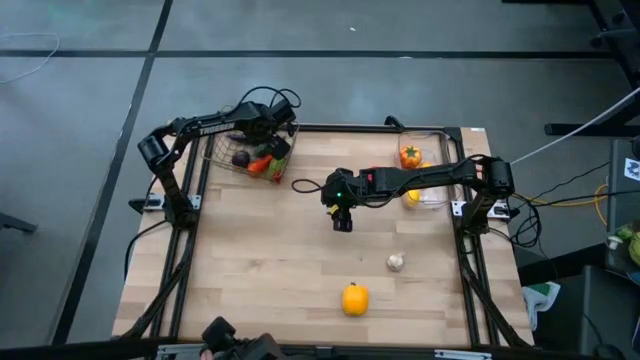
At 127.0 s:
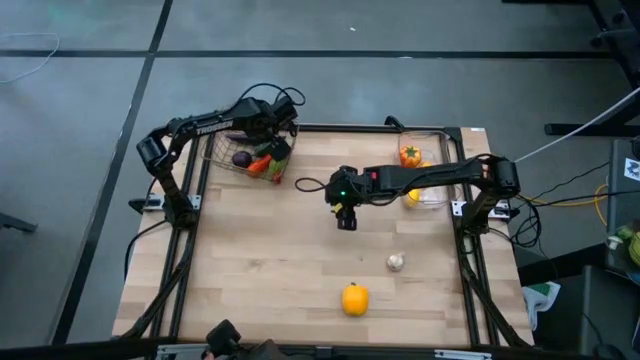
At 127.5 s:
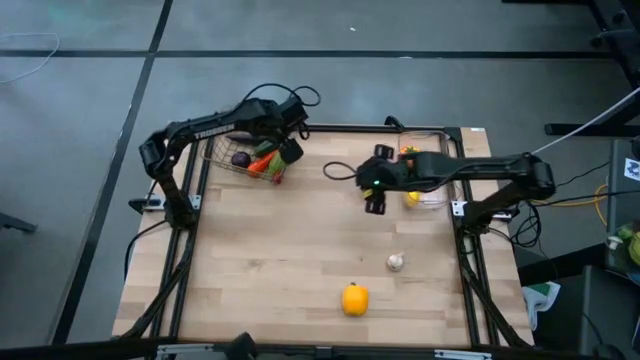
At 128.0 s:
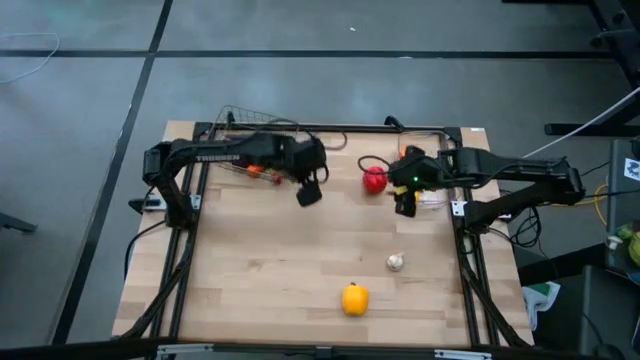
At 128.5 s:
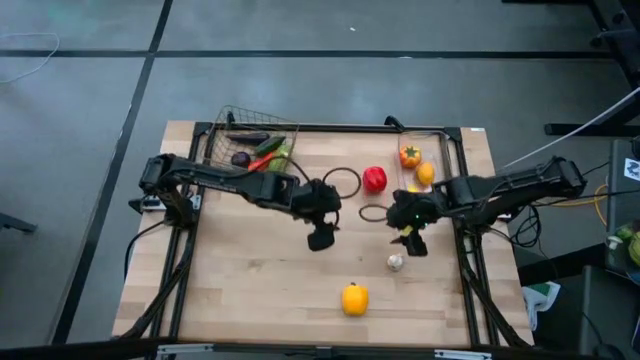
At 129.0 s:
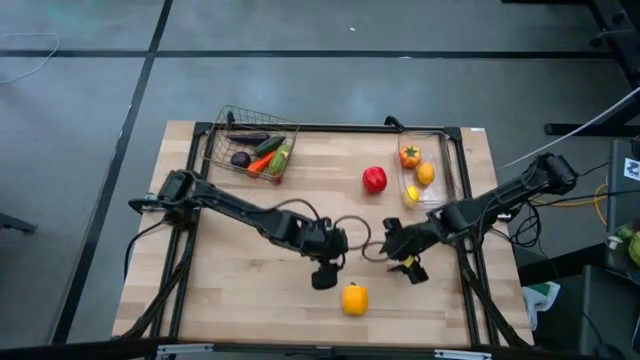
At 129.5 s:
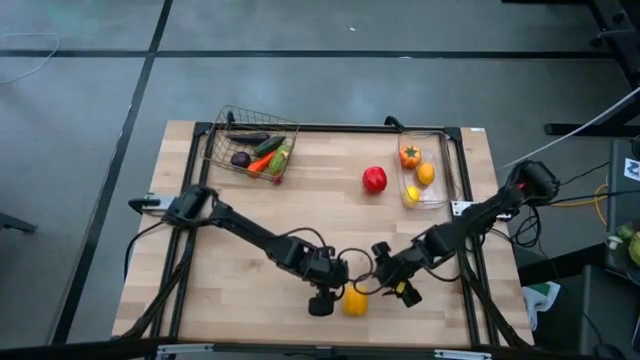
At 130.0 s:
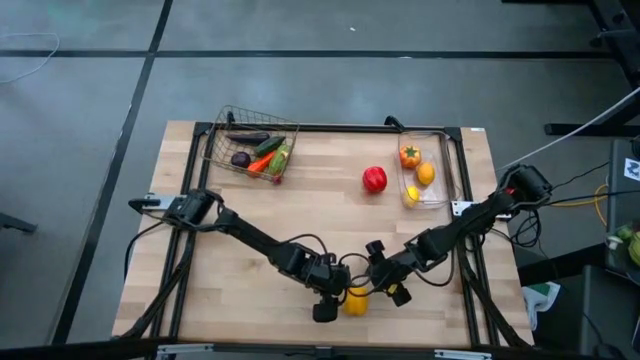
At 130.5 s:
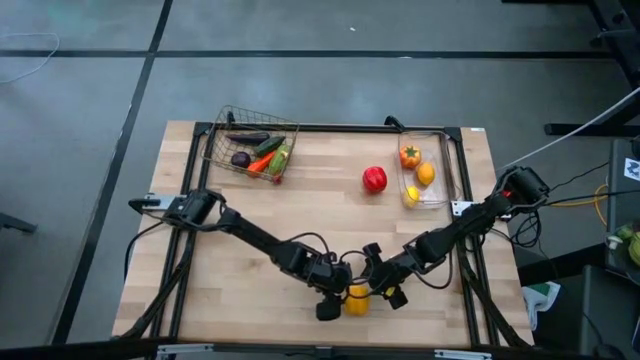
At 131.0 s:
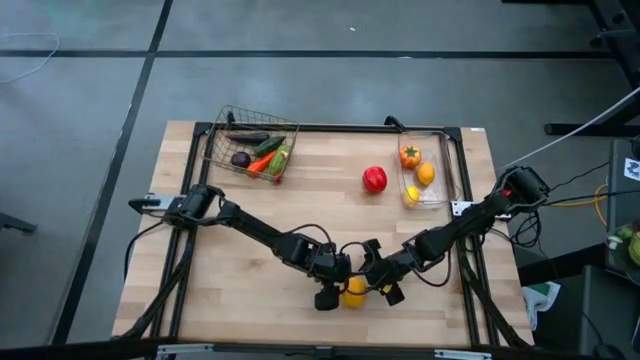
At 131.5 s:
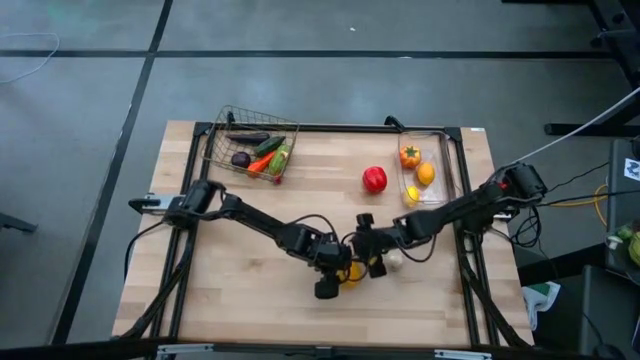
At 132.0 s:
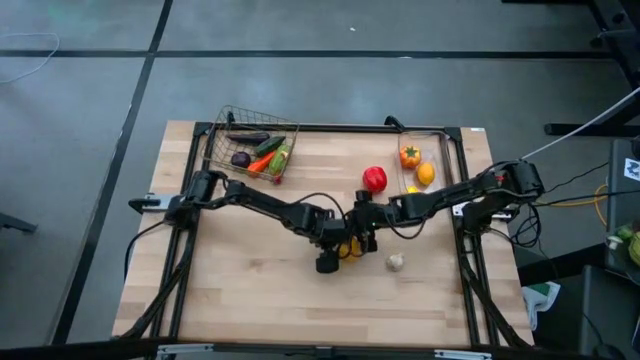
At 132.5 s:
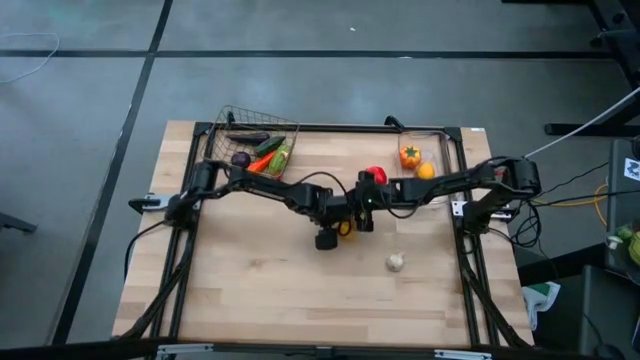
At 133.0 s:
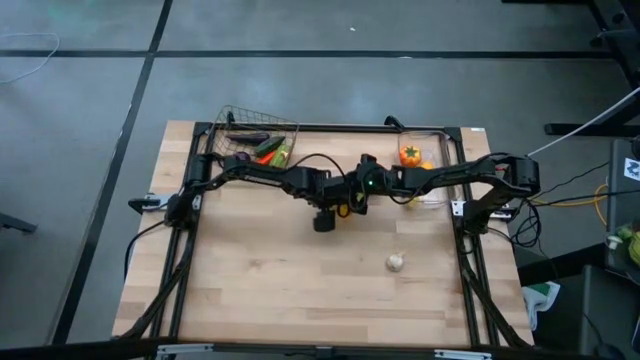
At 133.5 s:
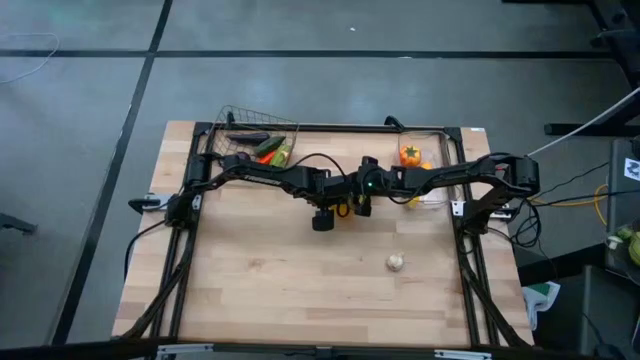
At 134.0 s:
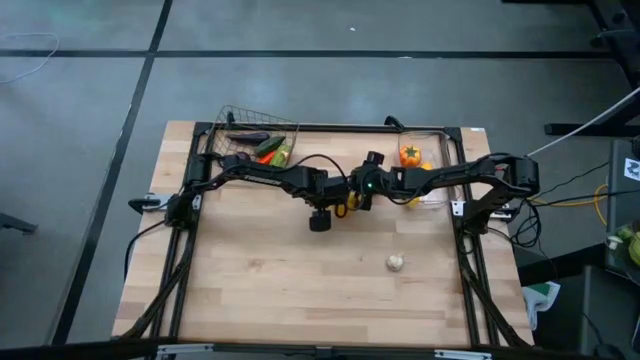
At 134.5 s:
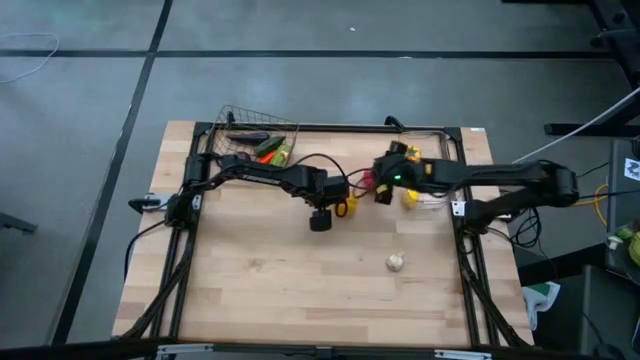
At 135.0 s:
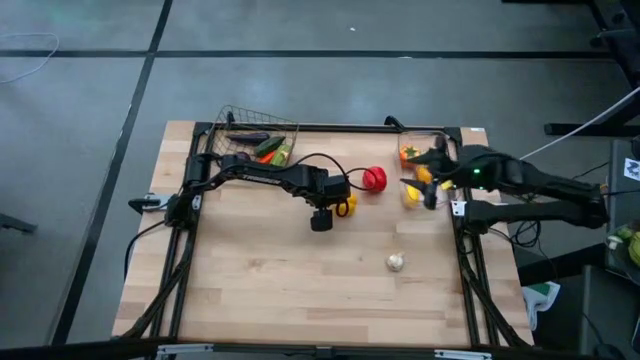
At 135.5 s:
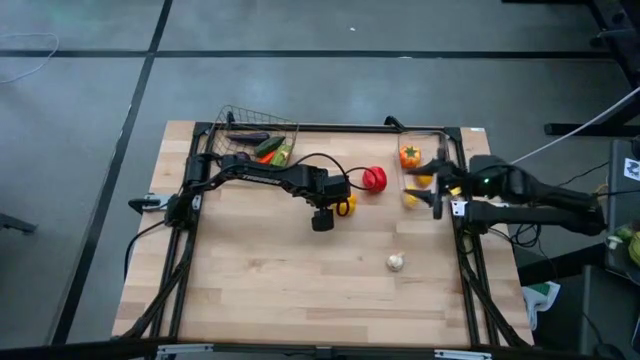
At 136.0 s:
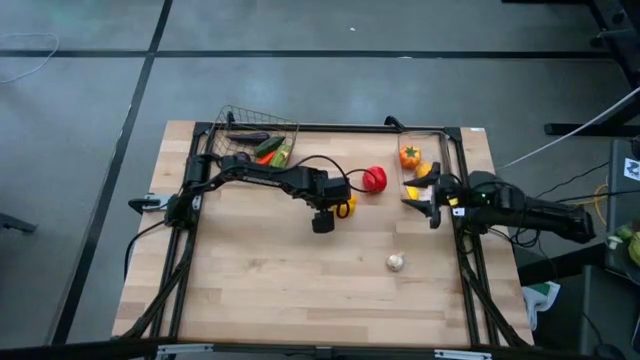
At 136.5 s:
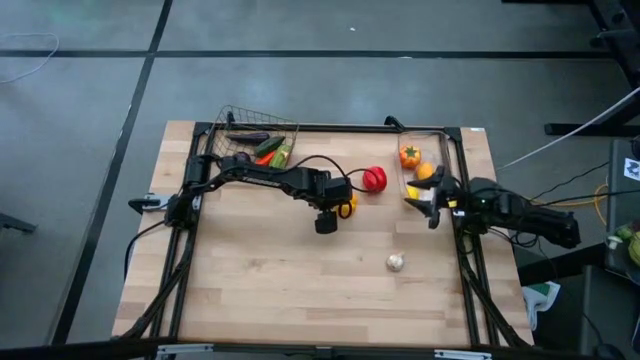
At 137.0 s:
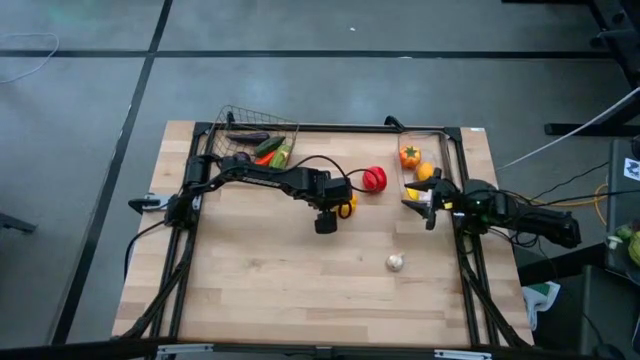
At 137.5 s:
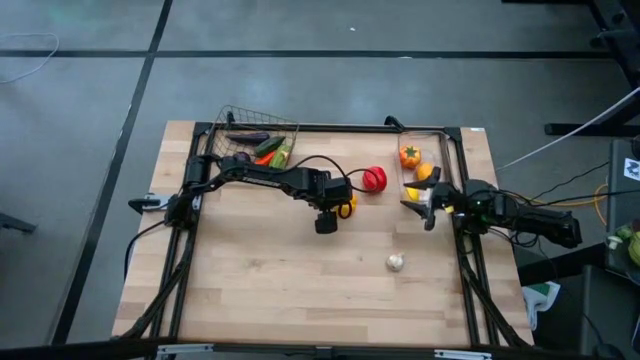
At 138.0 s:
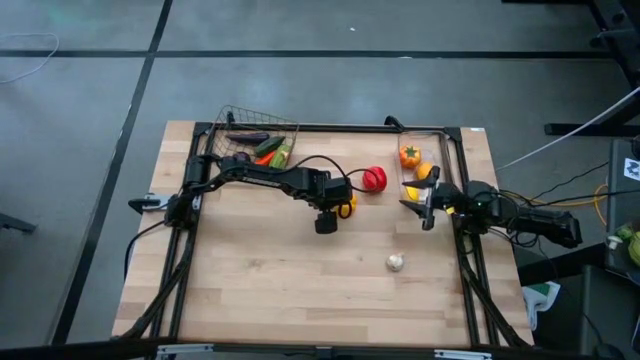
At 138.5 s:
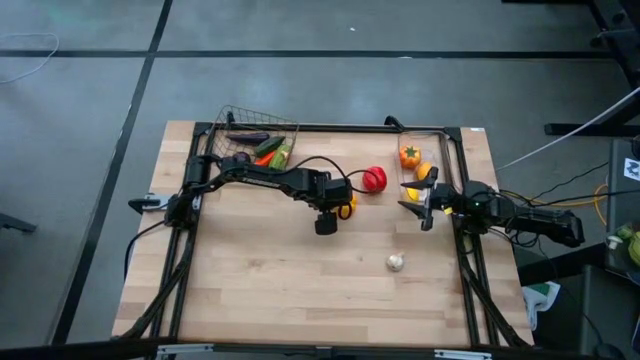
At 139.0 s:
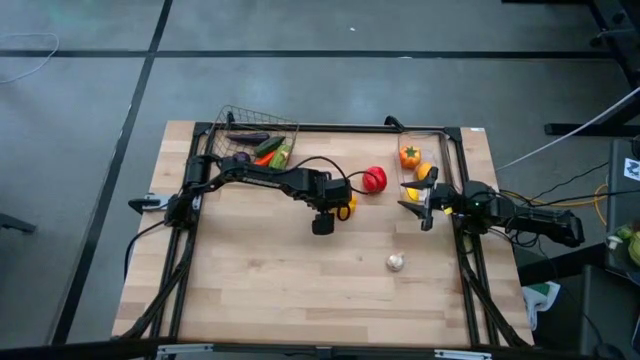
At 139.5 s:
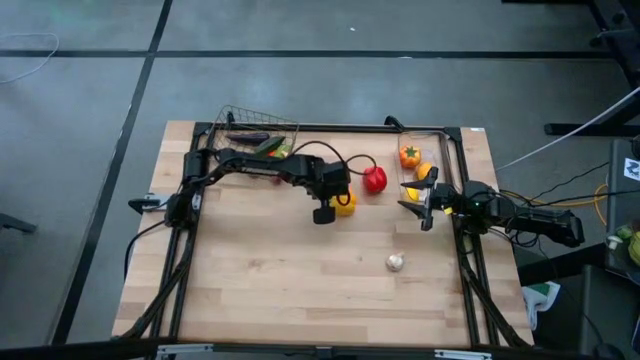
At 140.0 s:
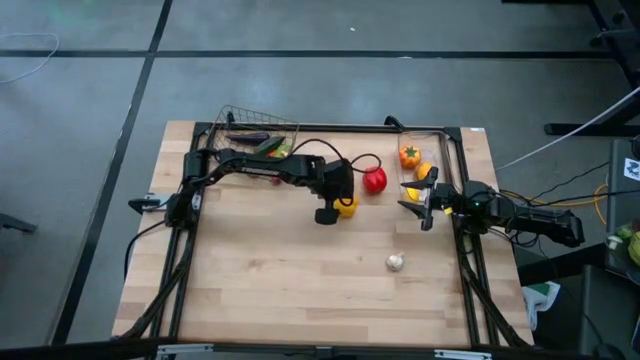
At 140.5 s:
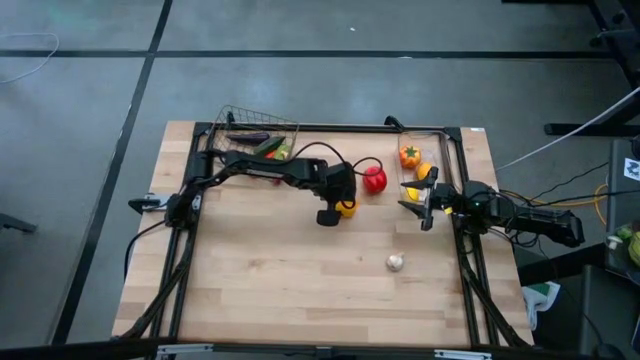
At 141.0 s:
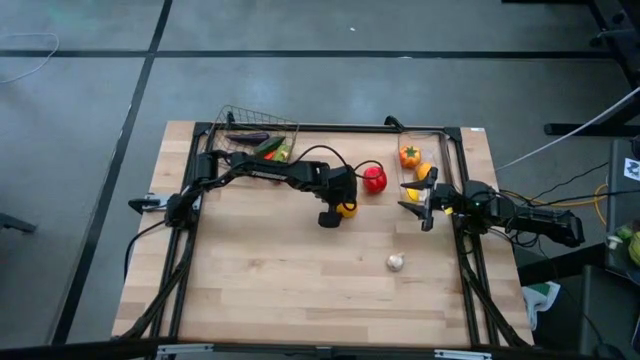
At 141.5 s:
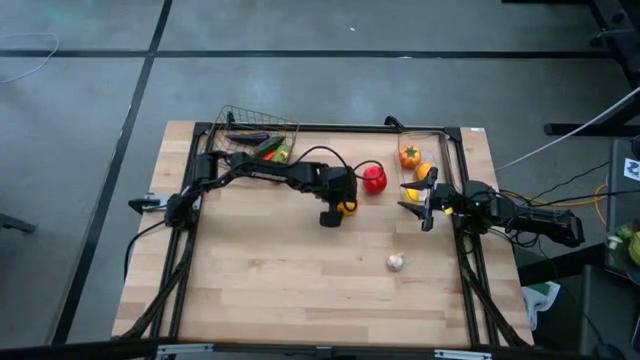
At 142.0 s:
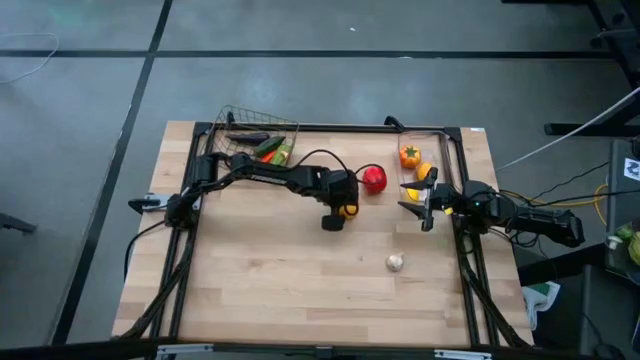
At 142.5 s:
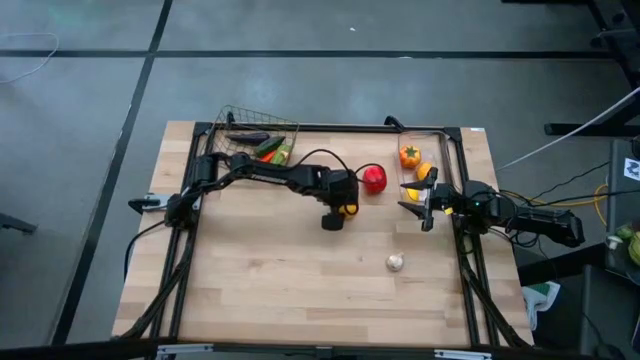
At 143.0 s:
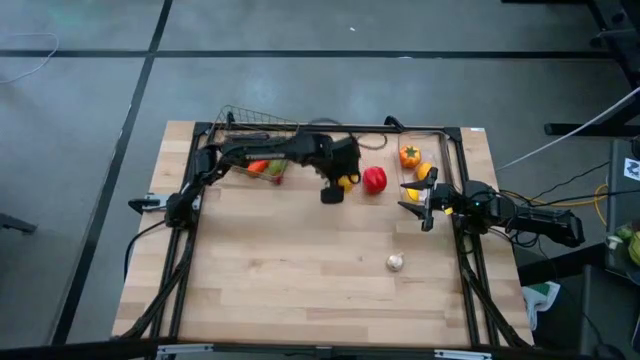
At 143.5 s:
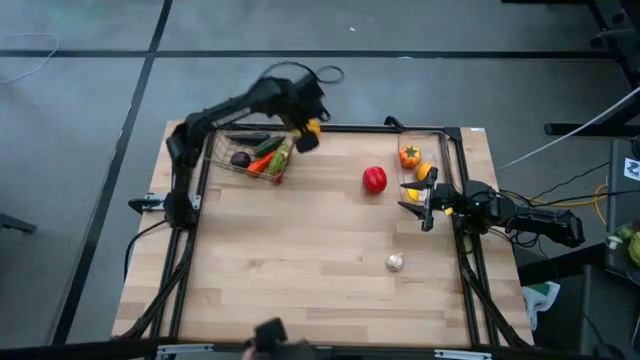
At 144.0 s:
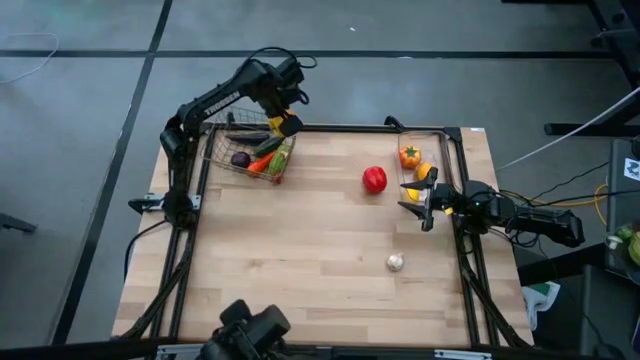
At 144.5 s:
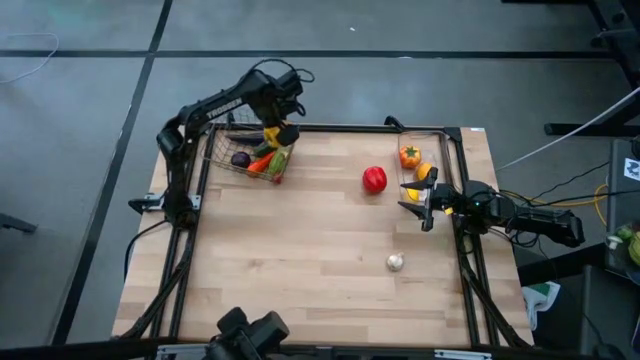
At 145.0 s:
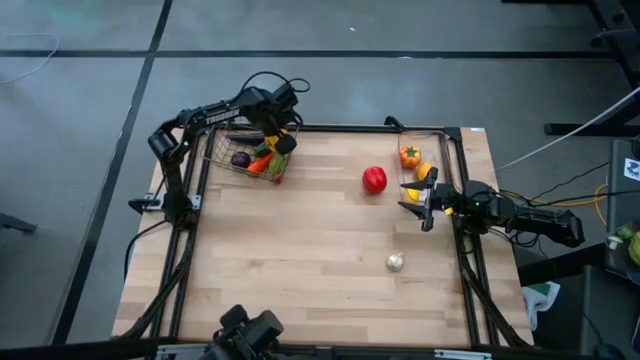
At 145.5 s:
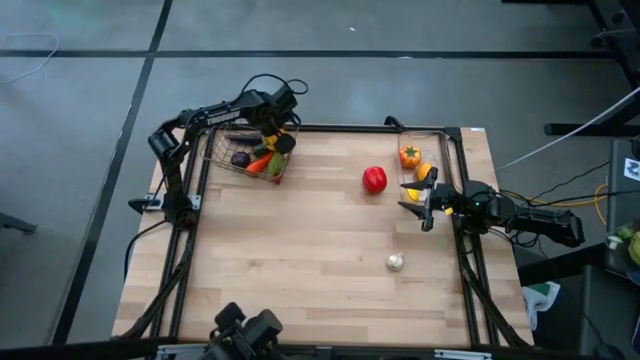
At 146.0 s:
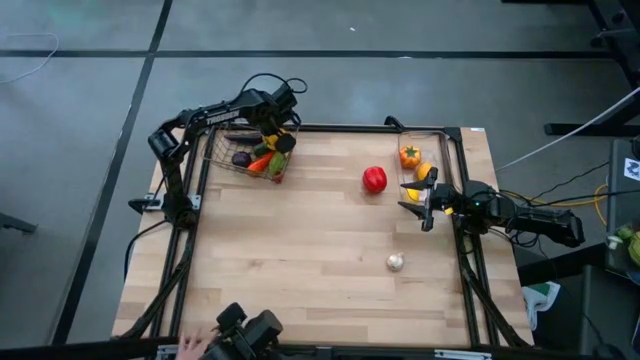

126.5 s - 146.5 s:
Task: Sort produce into baskets
Put the yellow bell pepper into the silver wire basket

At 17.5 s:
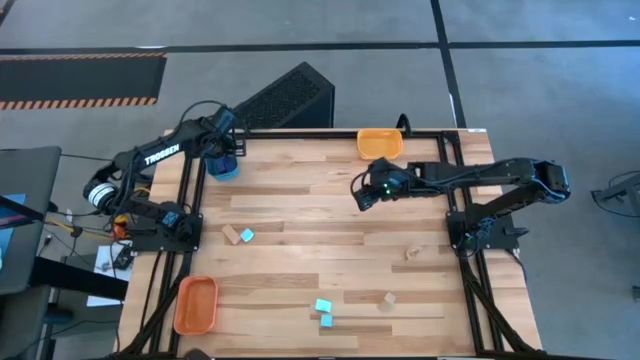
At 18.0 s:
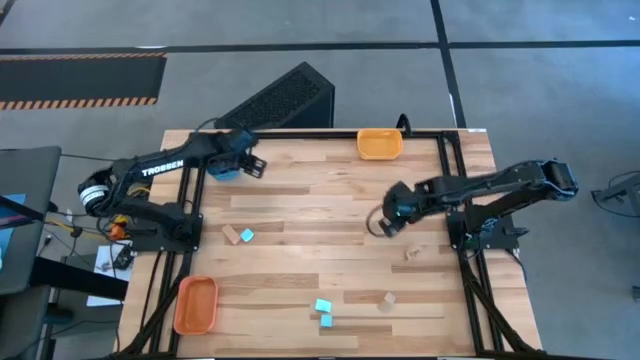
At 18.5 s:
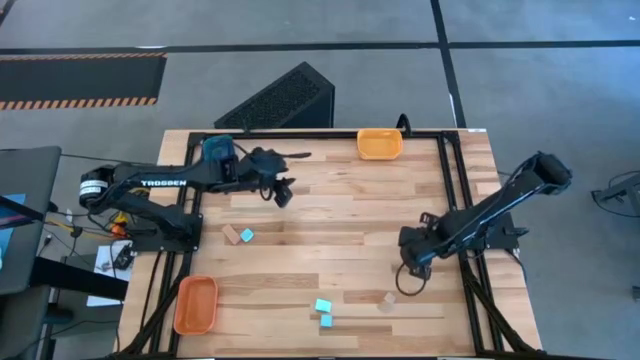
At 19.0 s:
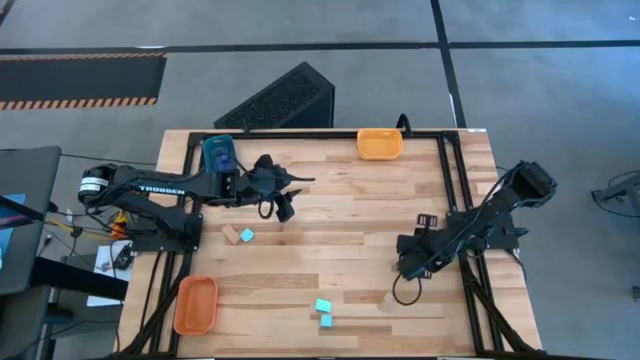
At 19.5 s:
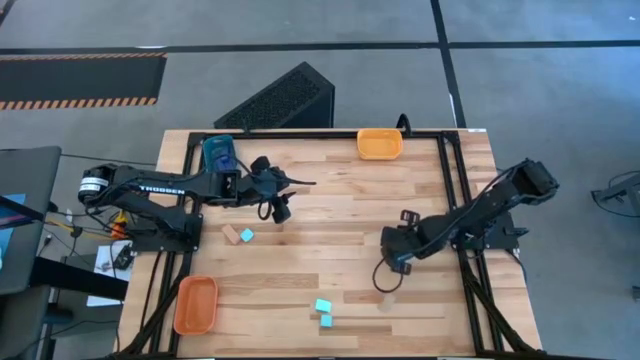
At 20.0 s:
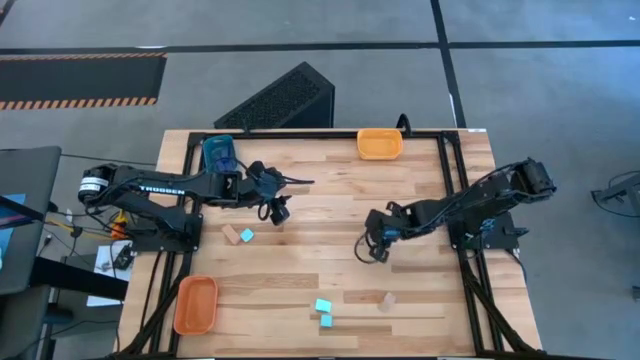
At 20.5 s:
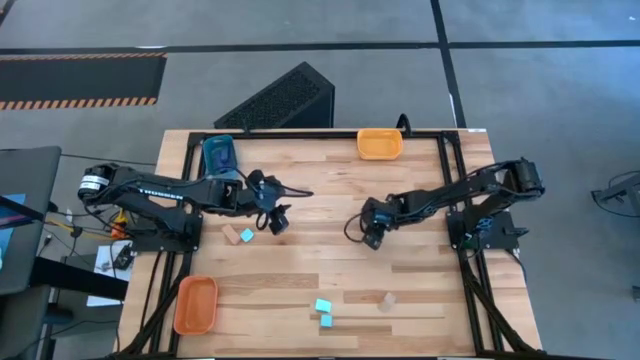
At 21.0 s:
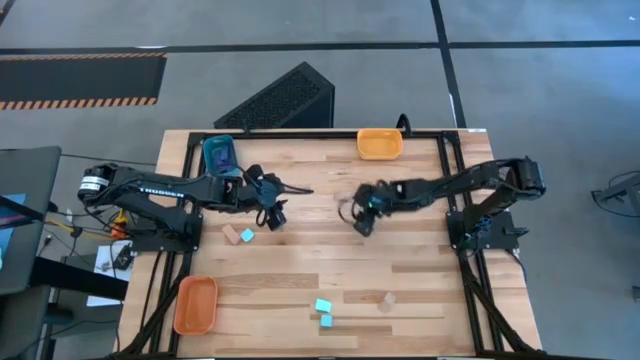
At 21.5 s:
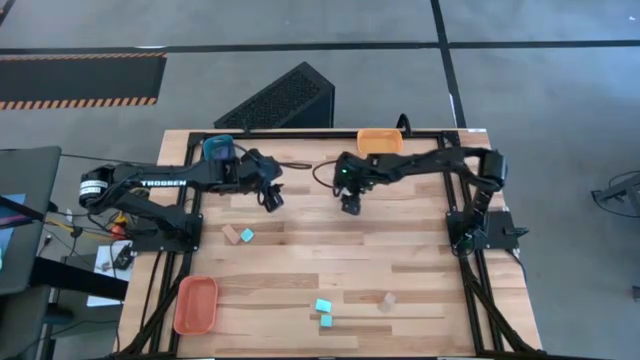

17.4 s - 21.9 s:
Task: Sort & place blocks by color
Put the top right brown block into the orange bin
